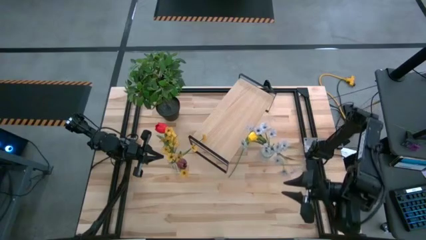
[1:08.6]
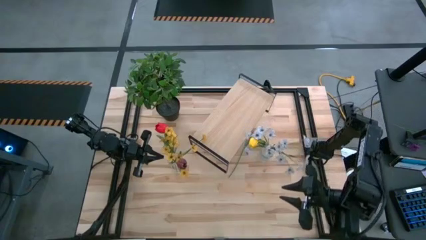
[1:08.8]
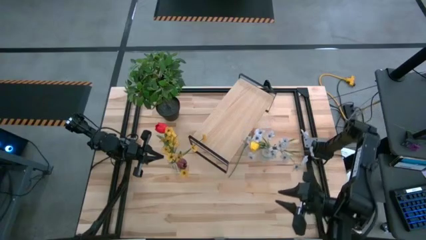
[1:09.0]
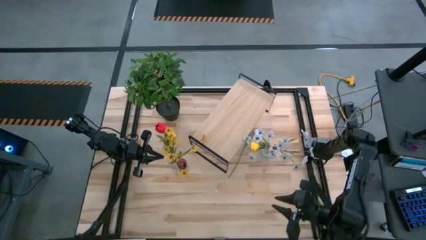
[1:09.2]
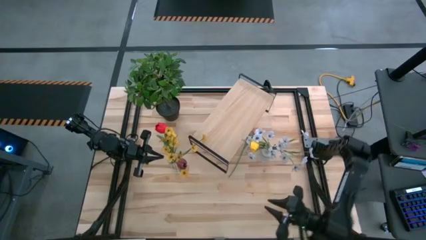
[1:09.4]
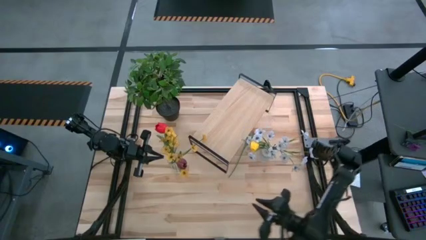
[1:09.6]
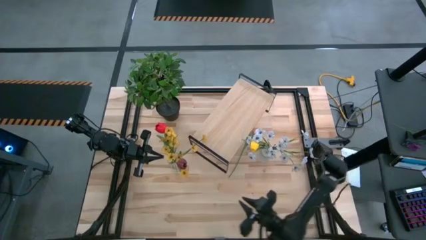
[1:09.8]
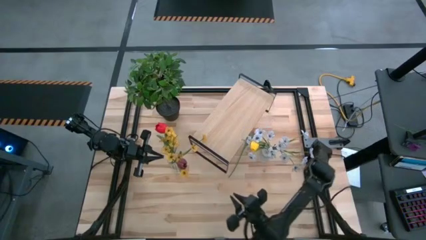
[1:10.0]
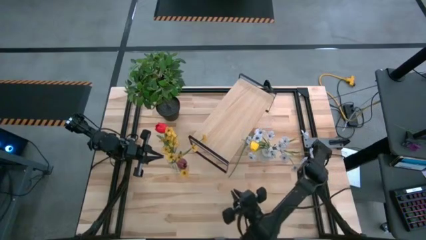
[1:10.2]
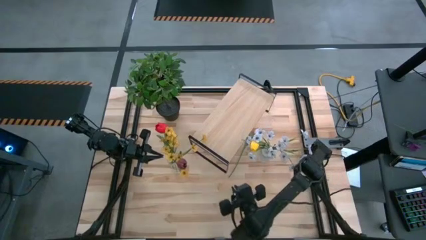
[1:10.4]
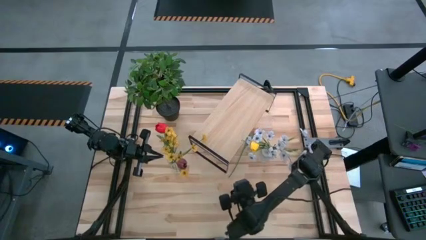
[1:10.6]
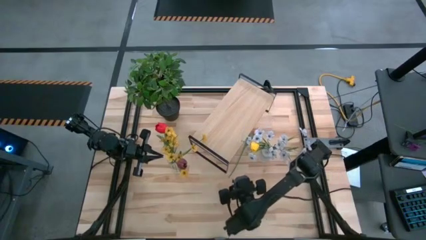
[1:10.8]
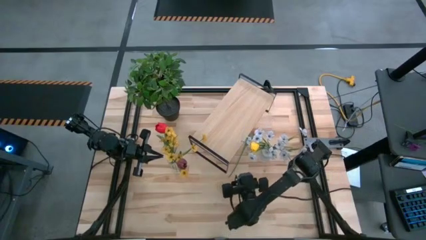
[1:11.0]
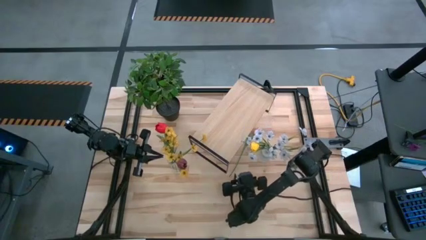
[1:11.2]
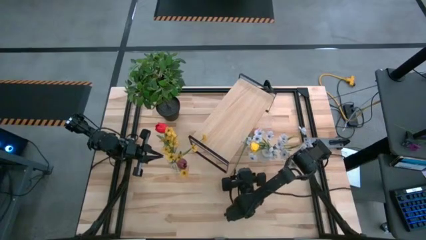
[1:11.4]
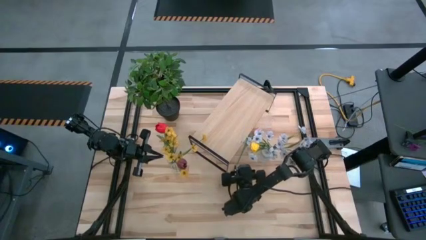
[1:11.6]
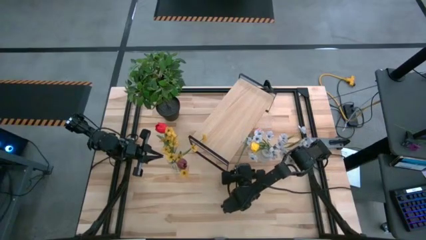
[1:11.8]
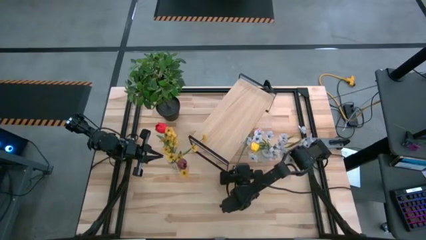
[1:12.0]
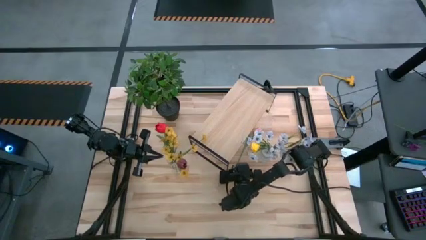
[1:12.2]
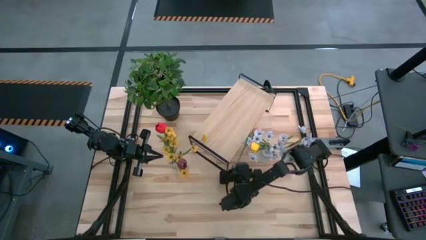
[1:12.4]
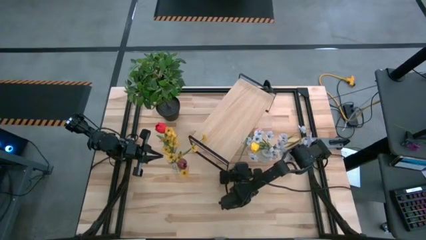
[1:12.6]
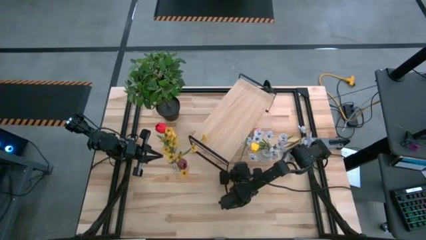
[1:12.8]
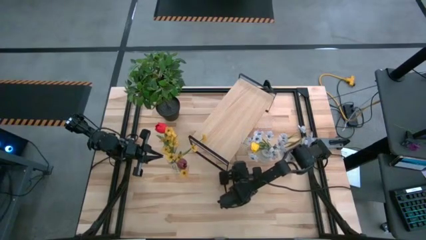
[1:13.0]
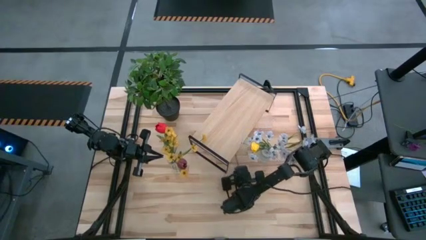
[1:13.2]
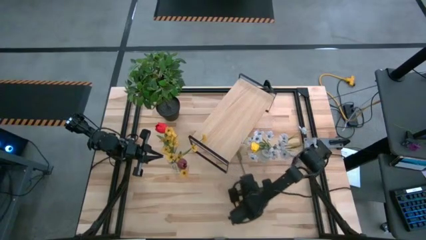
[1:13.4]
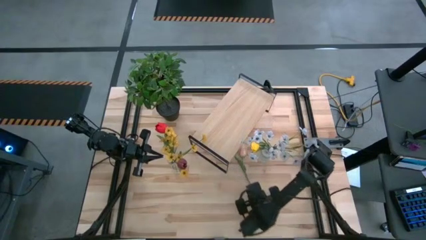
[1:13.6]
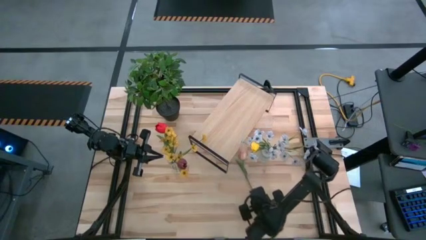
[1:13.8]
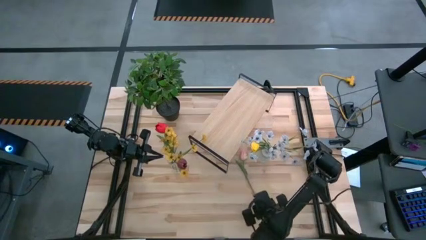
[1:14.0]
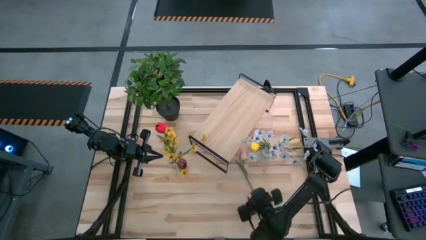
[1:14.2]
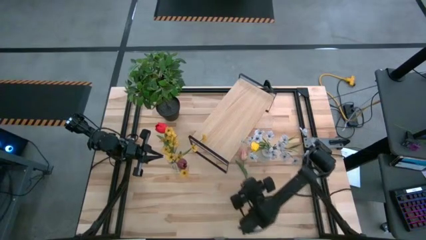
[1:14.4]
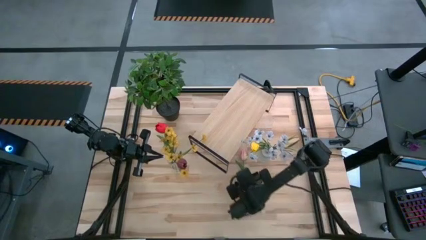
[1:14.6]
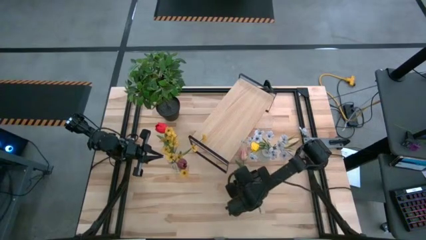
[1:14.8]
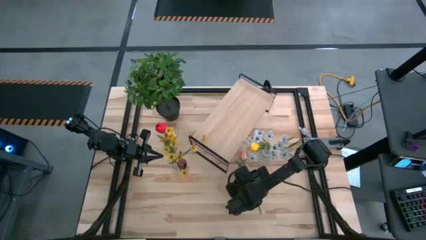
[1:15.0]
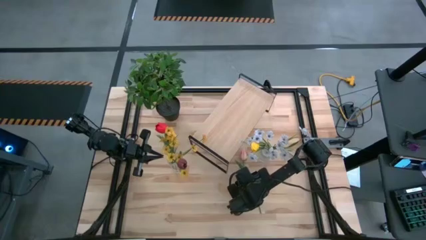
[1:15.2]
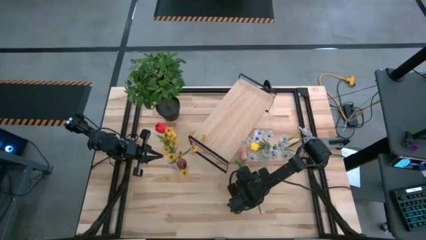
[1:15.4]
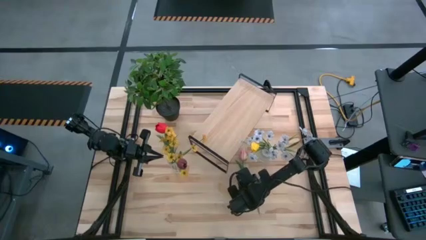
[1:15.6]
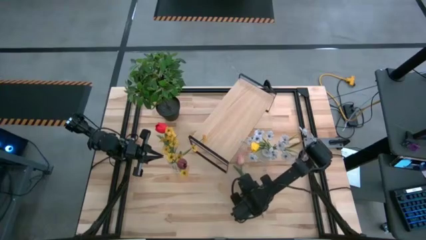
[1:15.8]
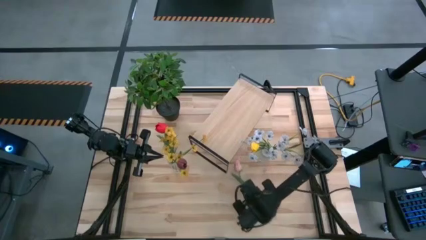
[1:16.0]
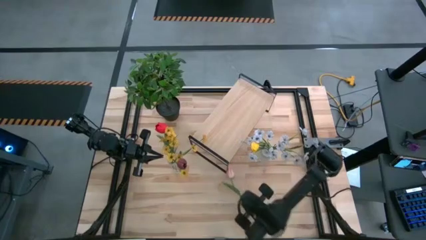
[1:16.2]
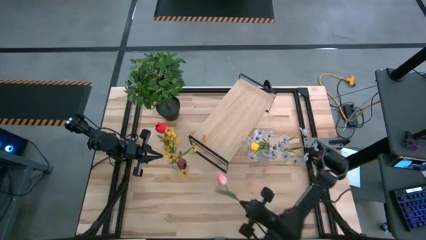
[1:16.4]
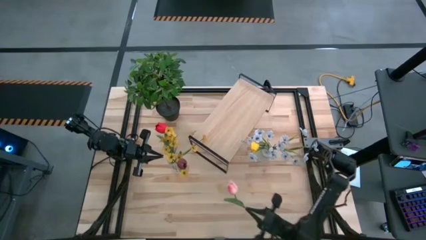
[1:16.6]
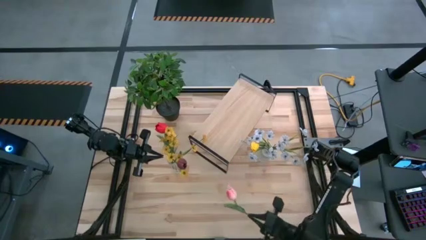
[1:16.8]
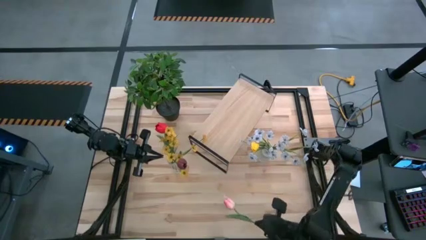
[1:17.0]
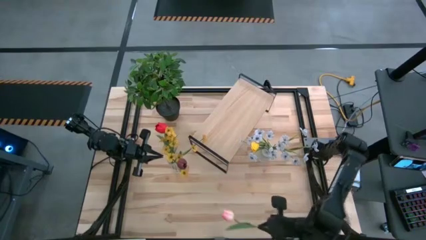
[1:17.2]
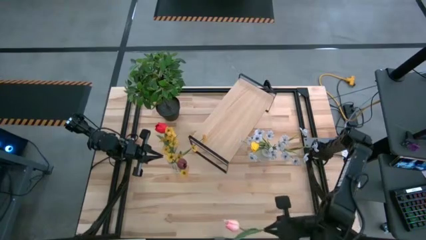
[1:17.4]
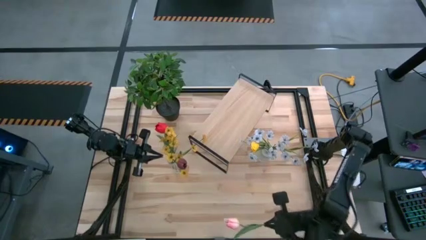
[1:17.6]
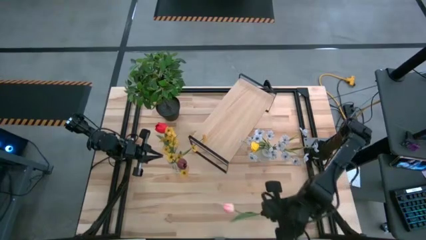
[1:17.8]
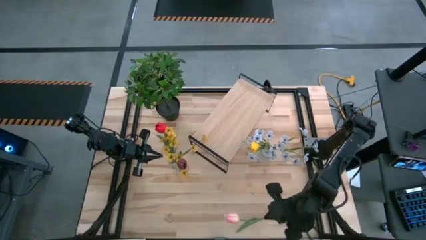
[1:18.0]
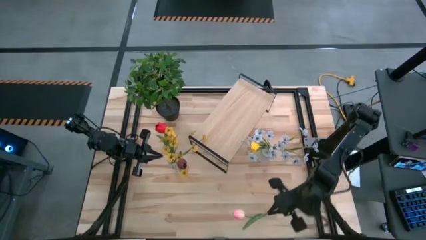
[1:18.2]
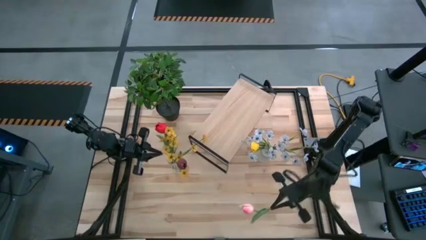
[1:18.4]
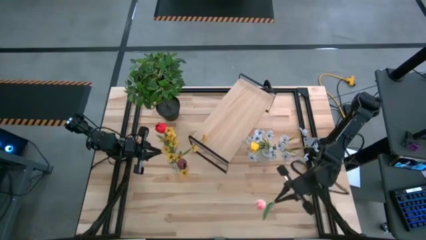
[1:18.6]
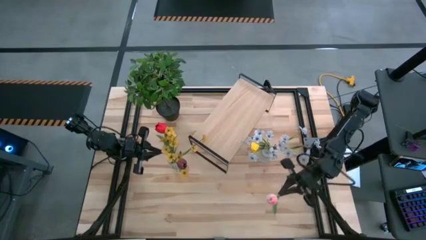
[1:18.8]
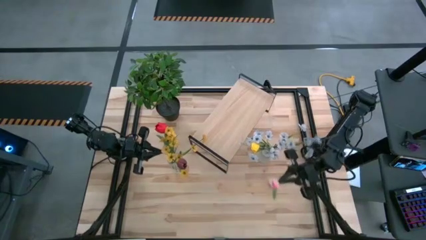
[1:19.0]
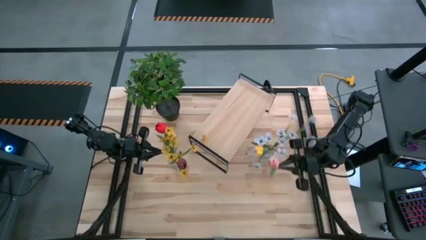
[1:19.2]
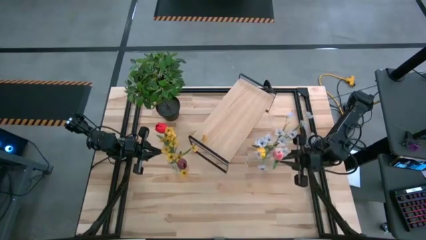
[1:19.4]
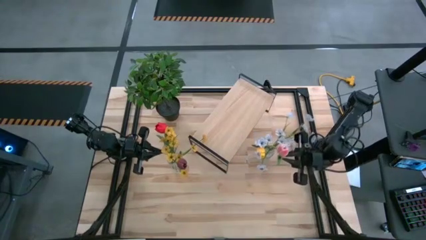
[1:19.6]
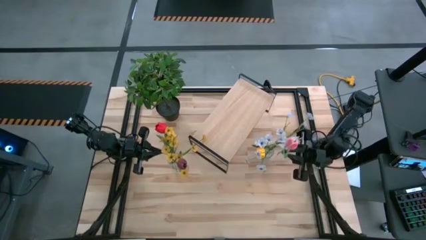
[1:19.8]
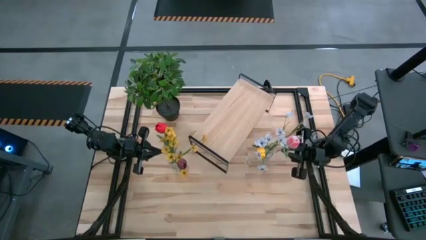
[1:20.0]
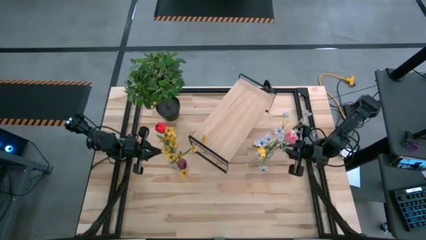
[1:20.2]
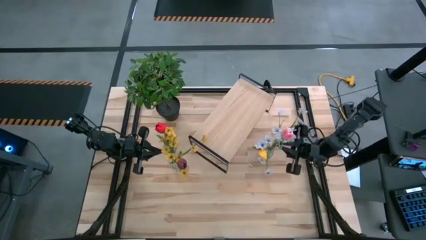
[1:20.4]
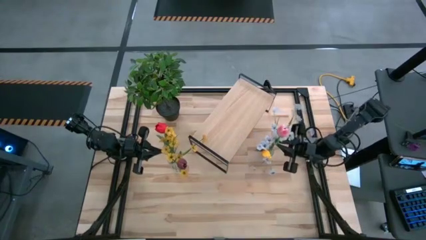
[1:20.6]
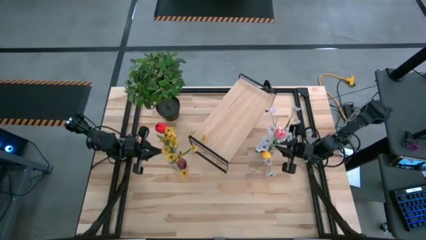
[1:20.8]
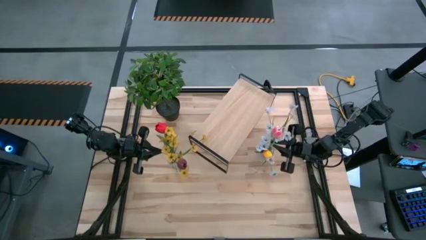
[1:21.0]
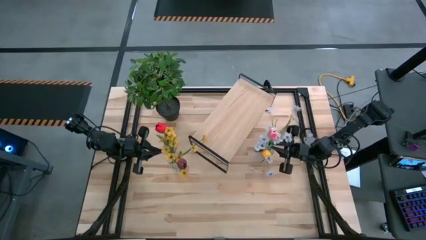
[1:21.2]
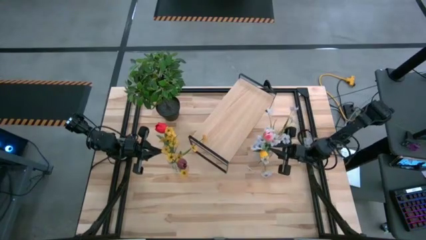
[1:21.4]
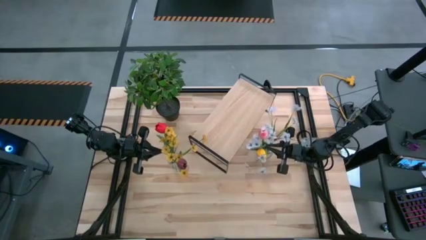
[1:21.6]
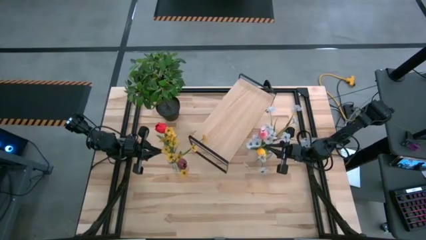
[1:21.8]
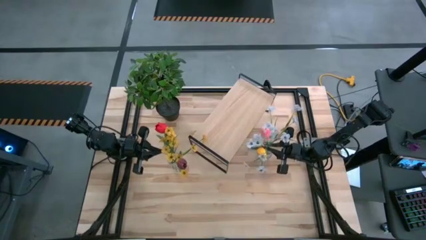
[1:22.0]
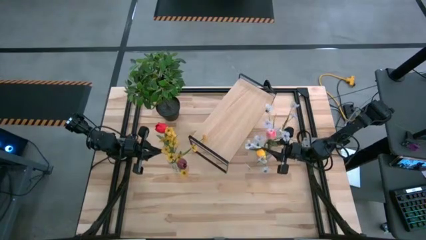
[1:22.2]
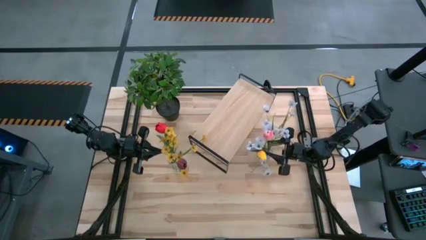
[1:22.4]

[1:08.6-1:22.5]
Task: Pick and place flowers into a vace then onto a shelf
Put the pink flower into the right transparent vase
